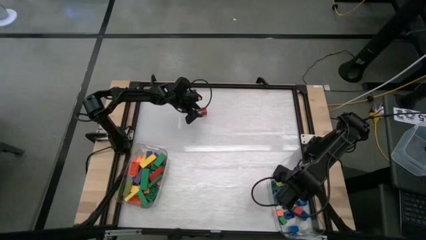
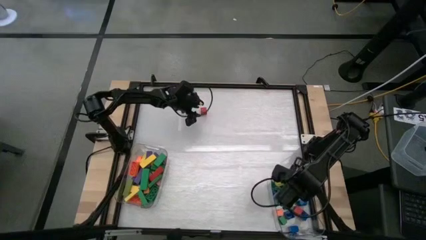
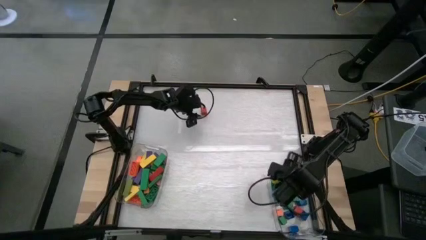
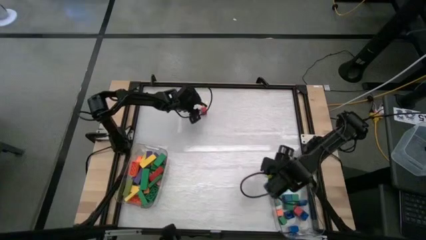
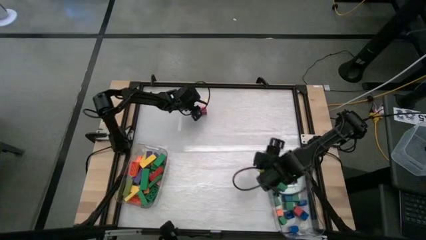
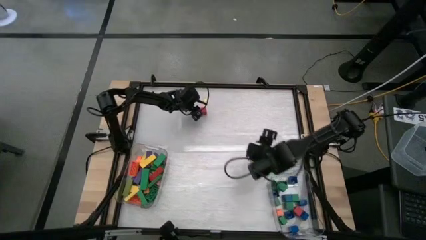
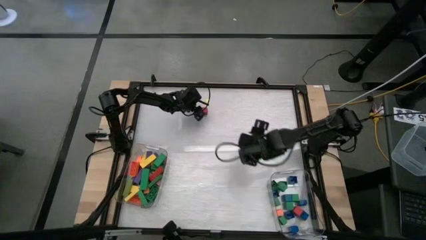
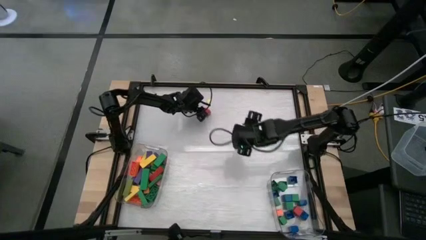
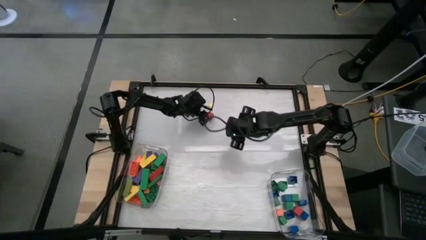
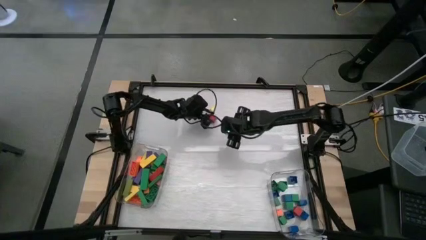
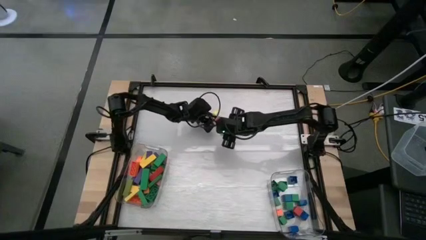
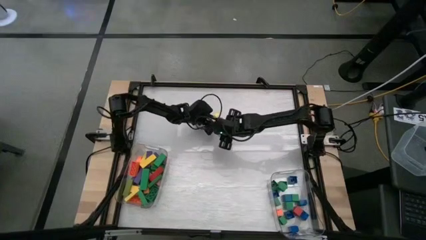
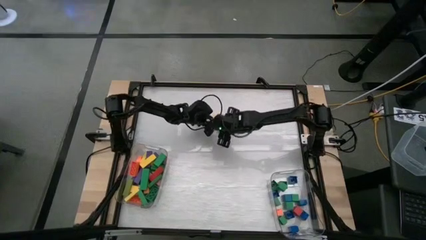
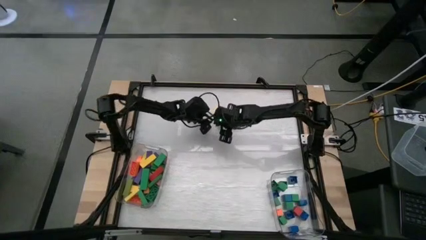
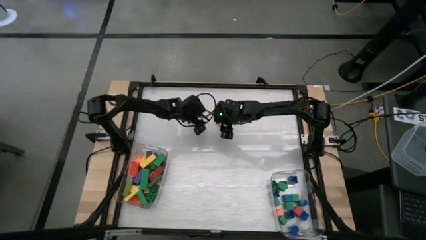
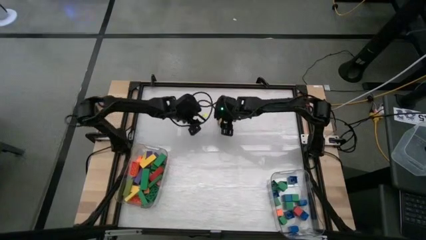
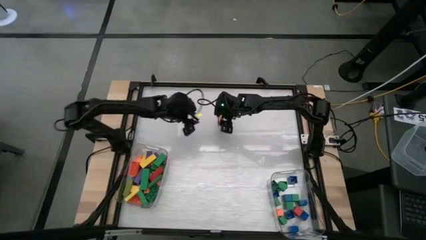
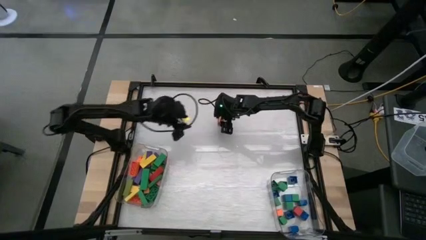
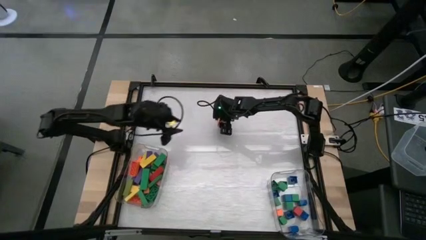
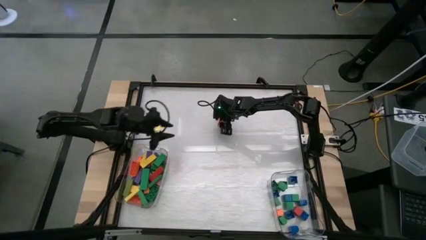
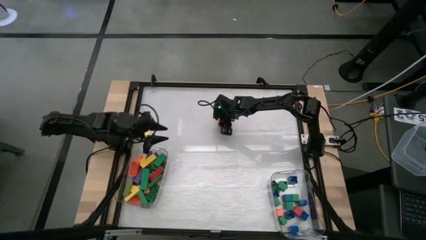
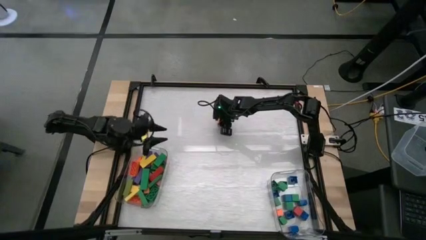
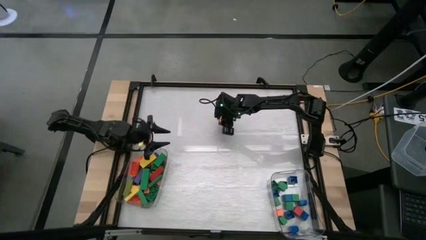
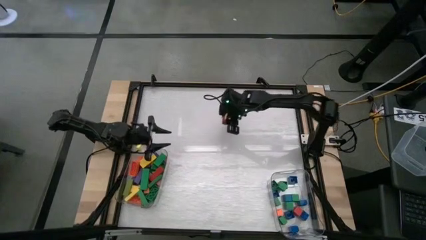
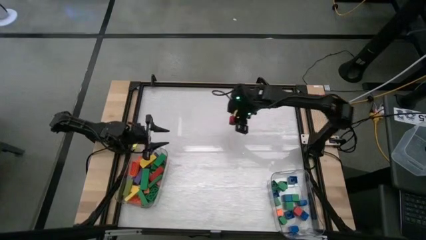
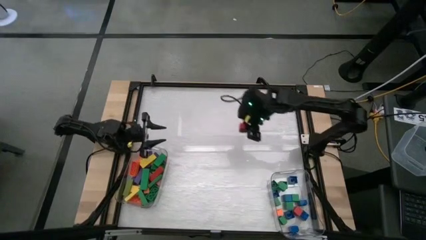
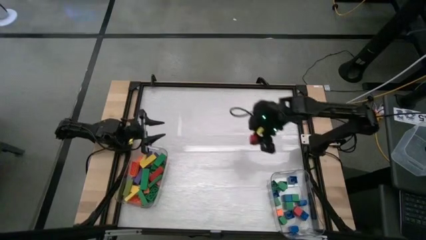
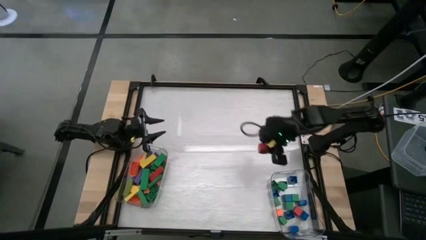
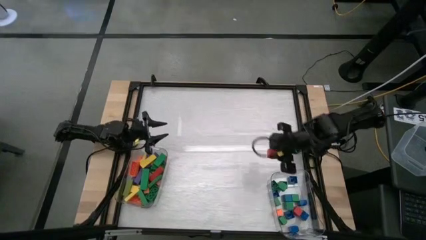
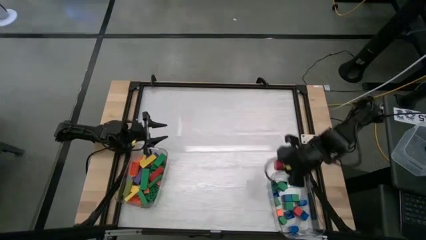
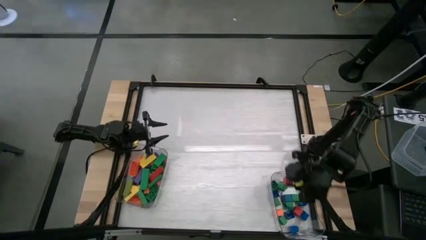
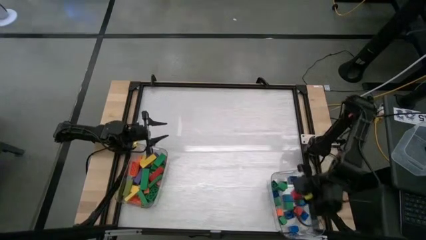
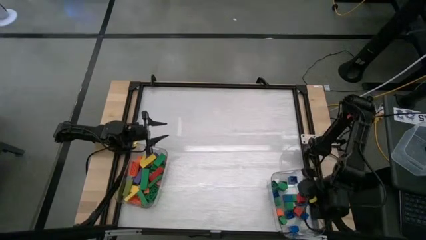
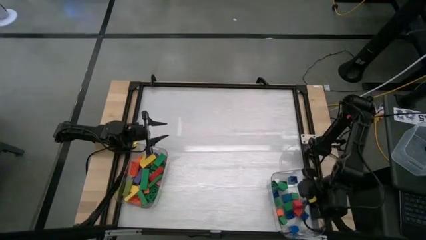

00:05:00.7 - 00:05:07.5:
Task: Sort blocks by size
Put the small red wooden block into the right transparent bin

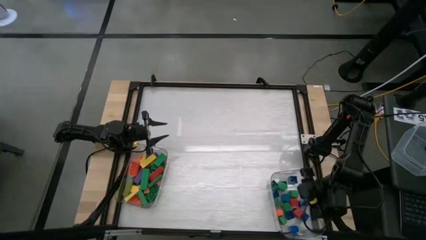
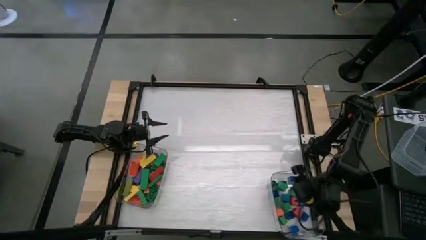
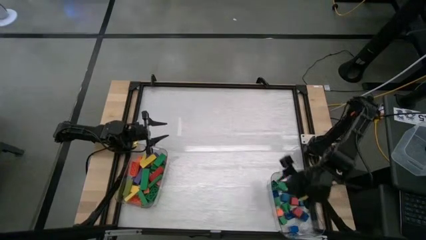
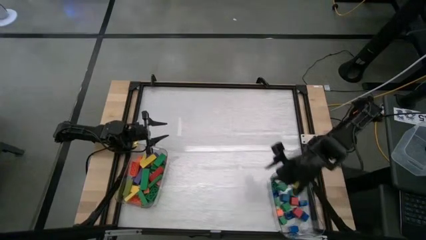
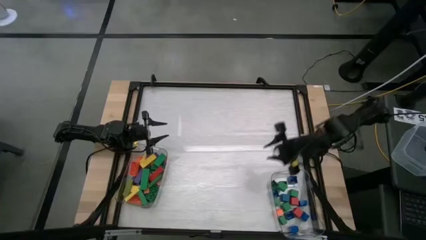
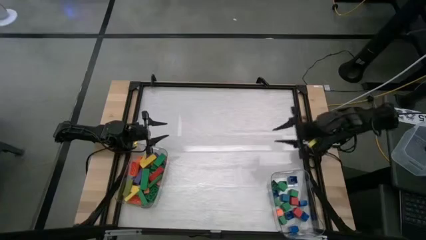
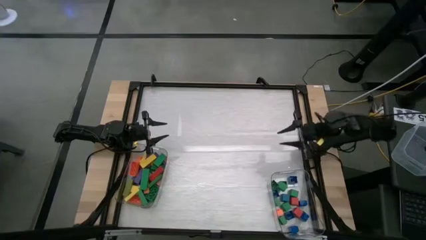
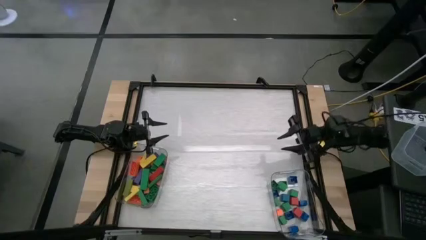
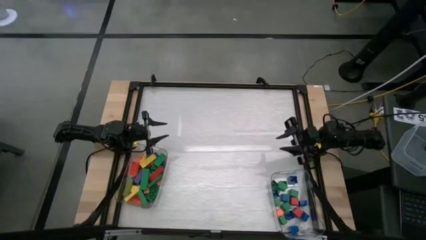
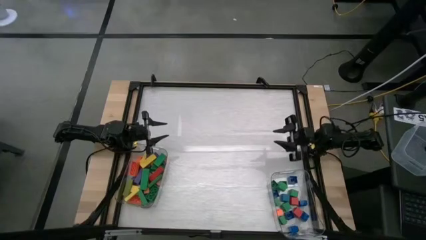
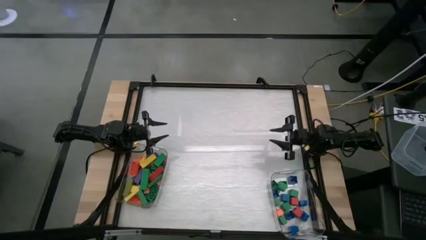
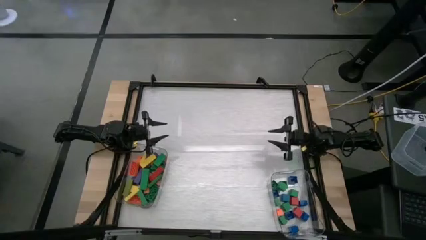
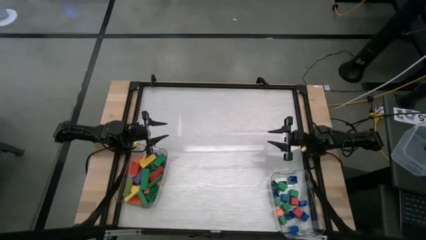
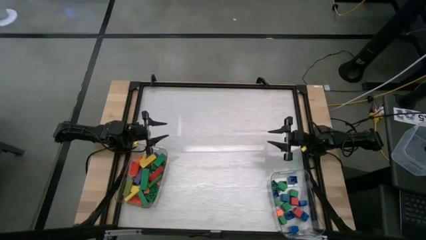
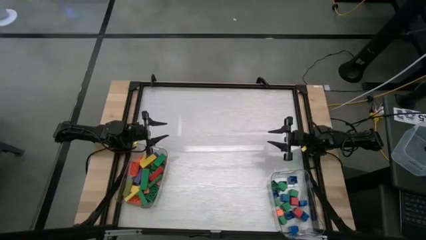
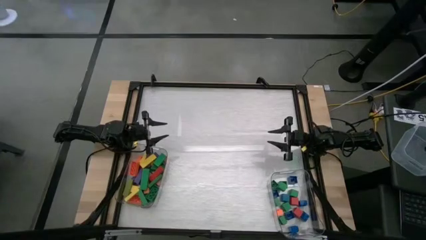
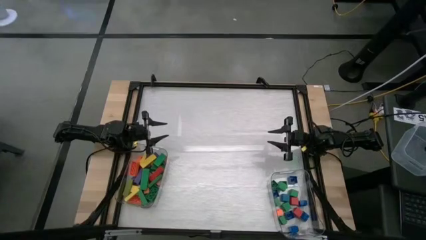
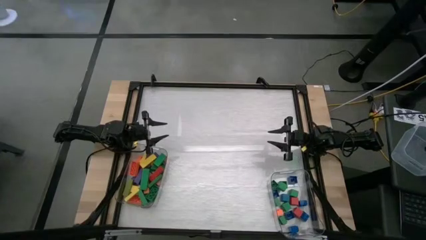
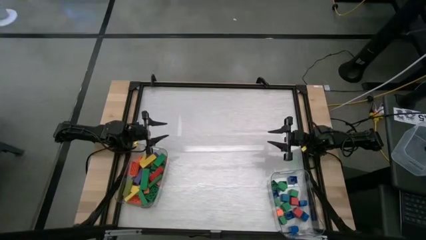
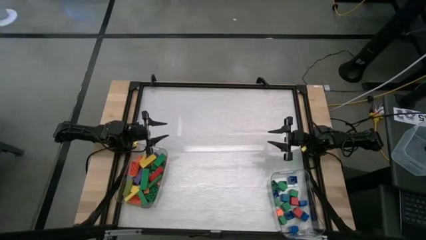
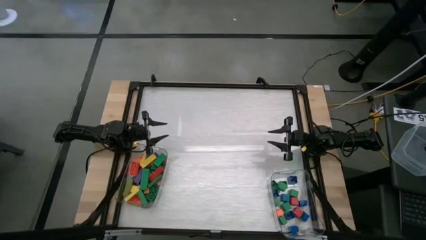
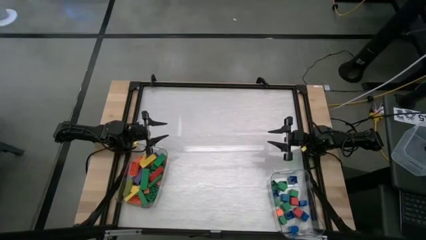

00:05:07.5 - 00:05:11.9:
Return to Home Position

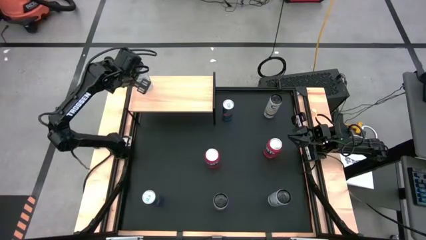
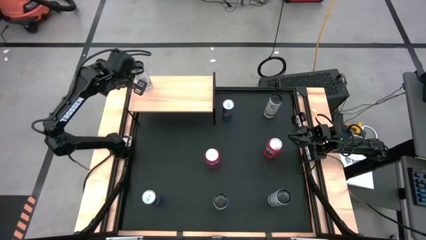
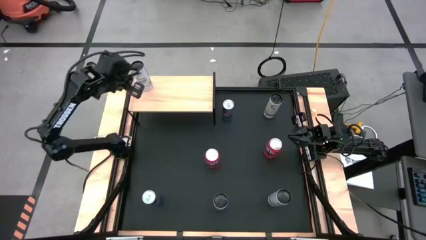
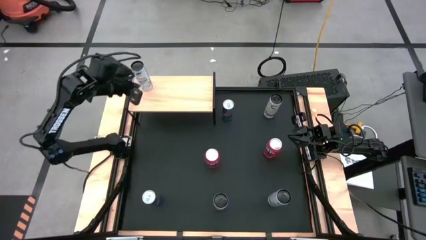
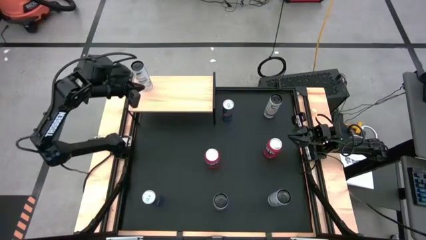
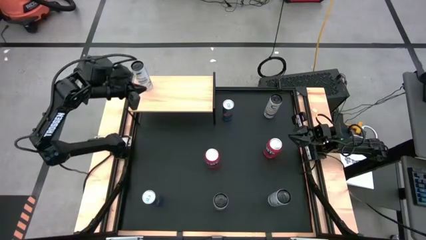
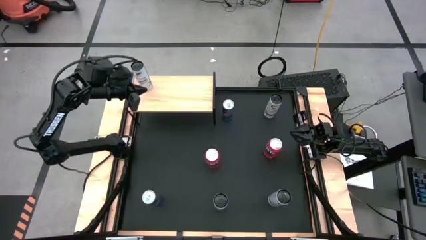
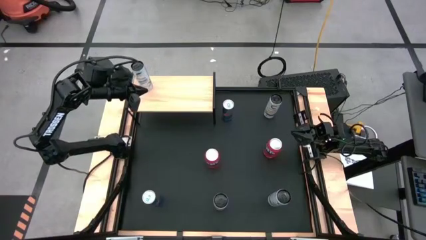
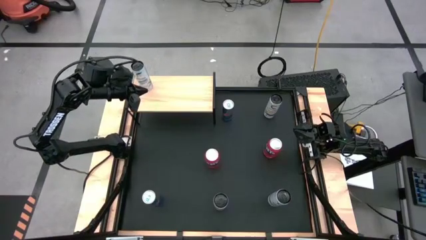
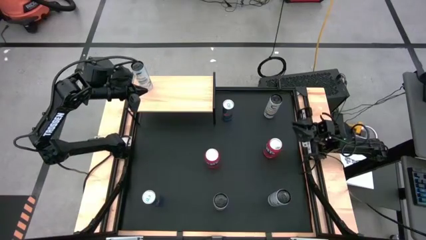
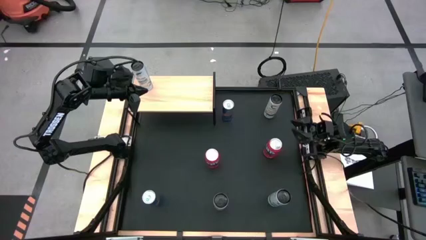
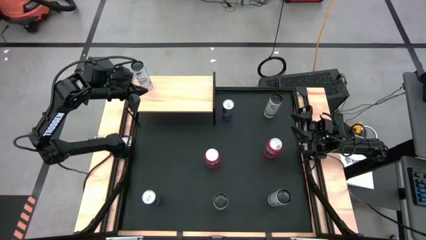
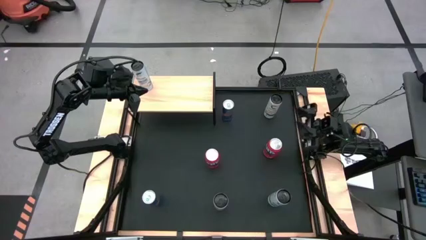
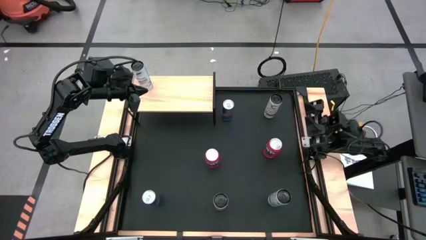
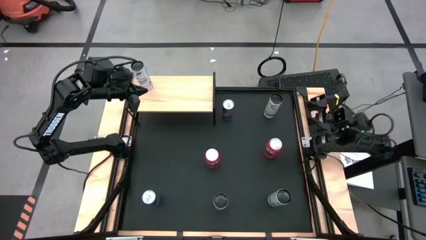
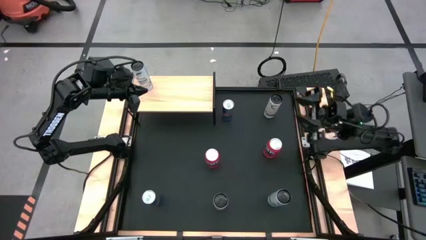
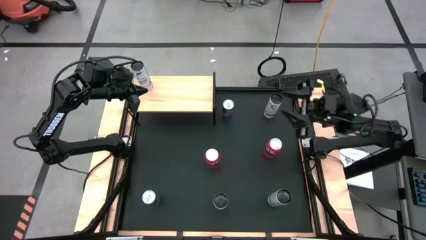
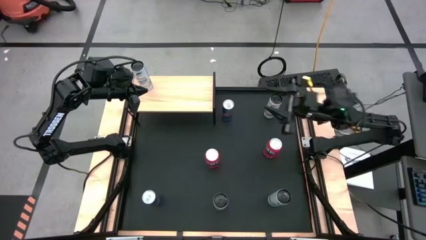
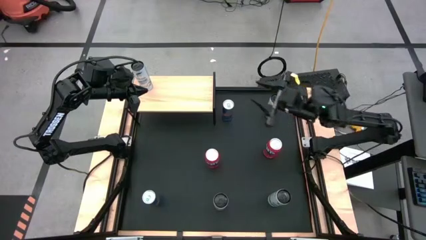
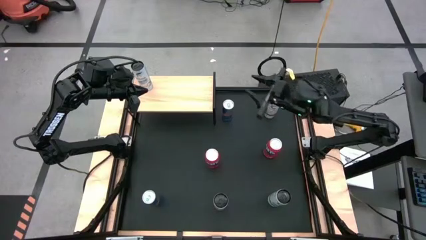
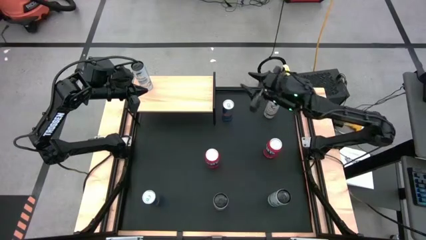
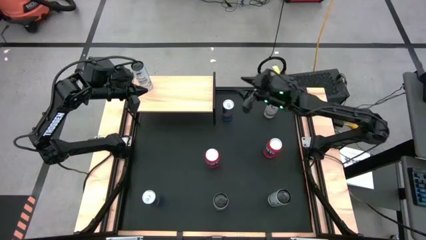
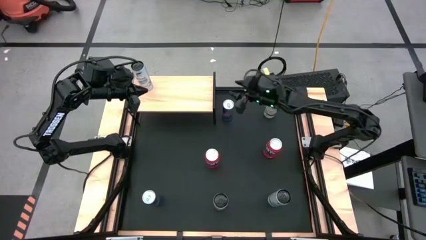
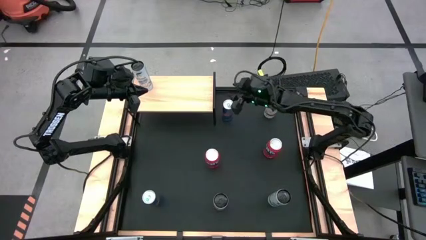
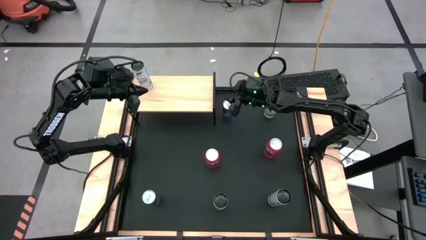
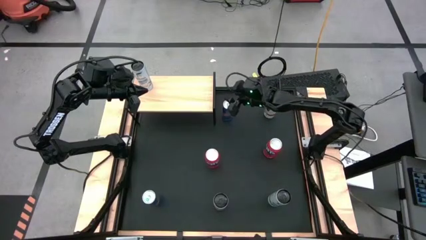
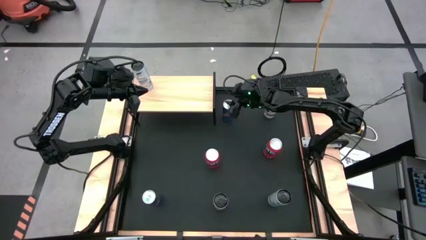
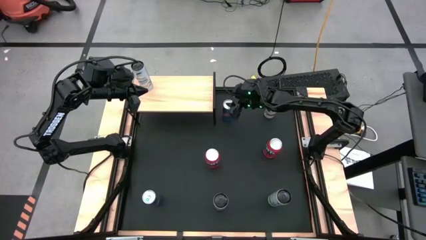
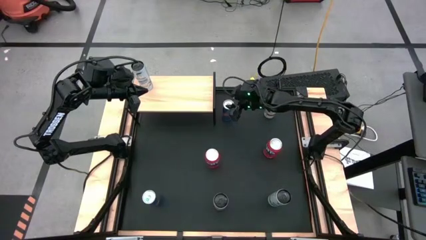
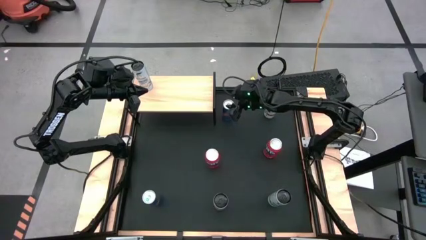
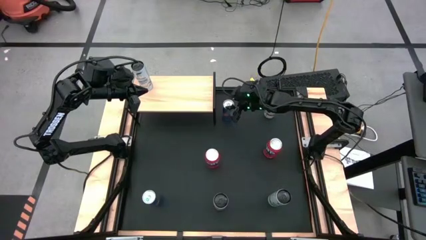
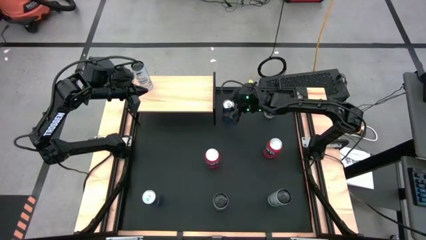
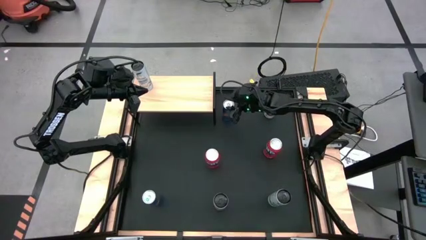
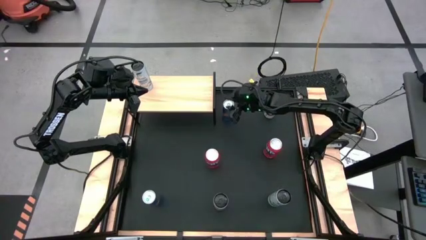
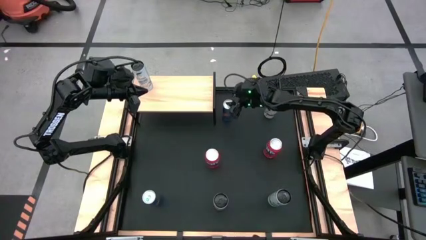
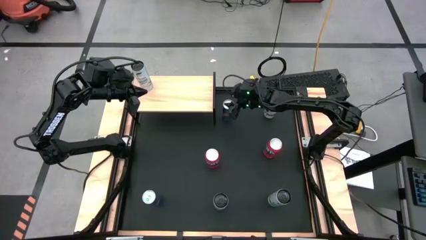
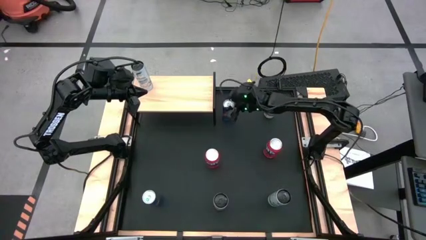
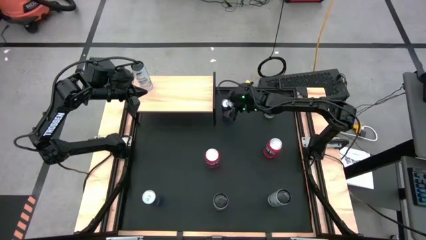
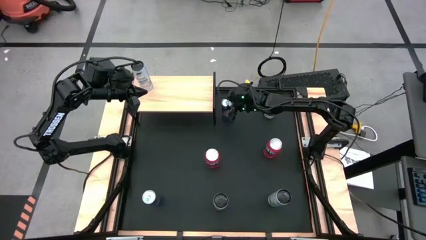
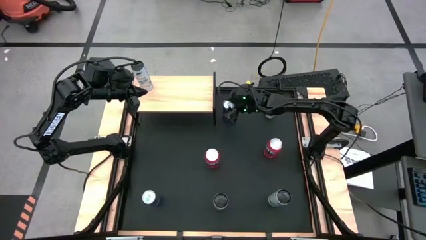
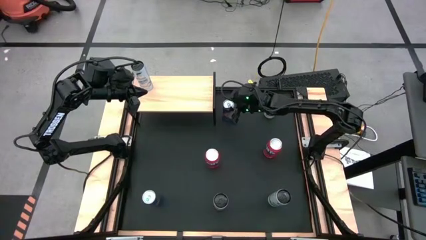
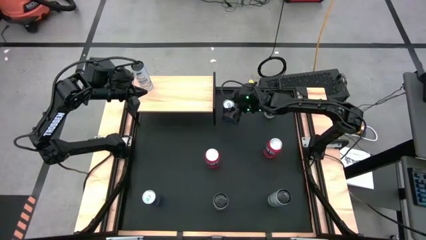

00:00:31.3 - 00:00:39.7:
Task: Place canned beverage on shelf
Put the top blue soda can on the shelf
